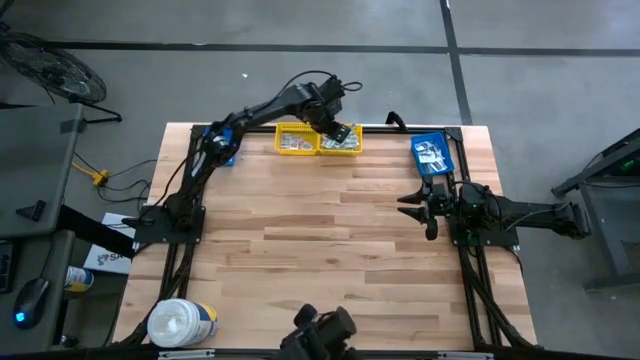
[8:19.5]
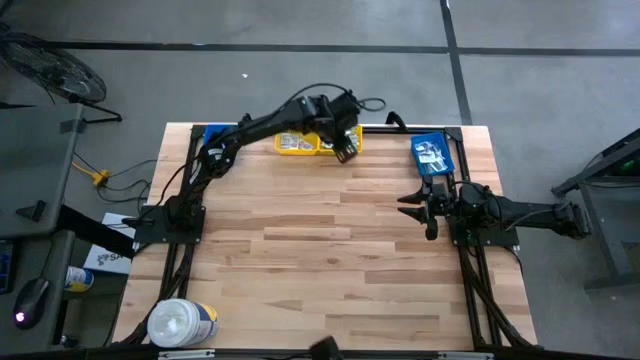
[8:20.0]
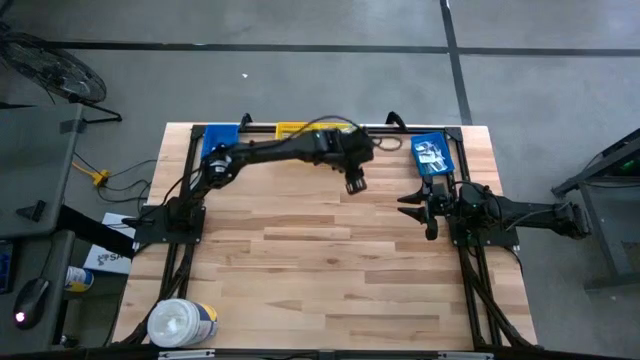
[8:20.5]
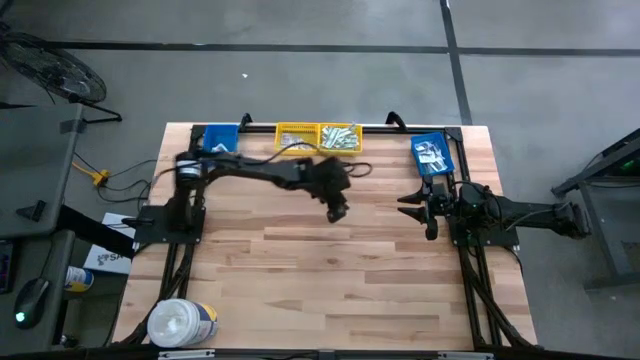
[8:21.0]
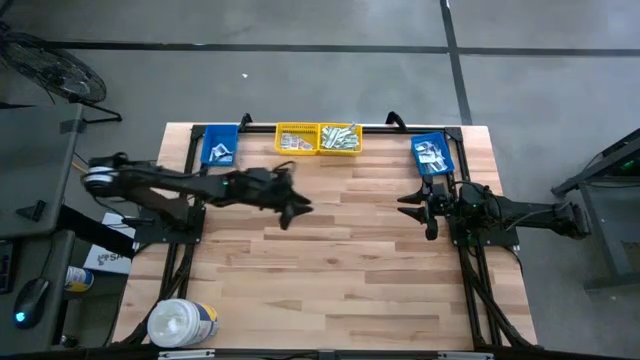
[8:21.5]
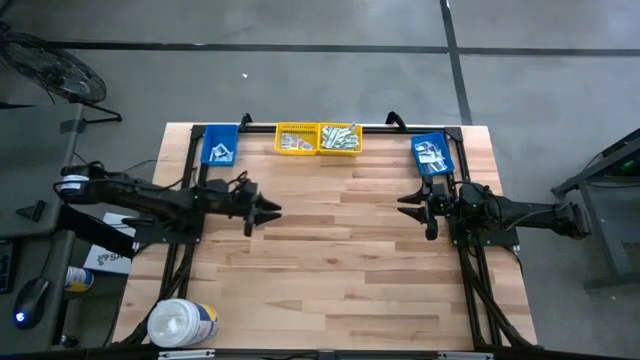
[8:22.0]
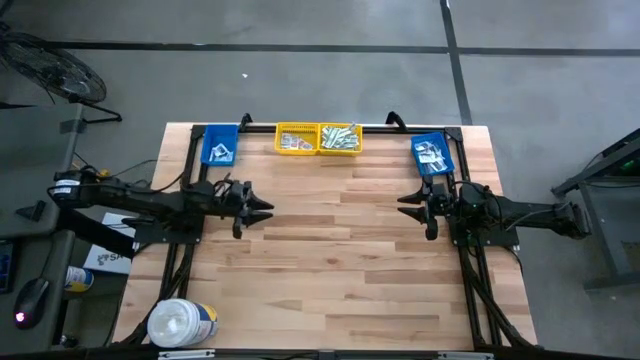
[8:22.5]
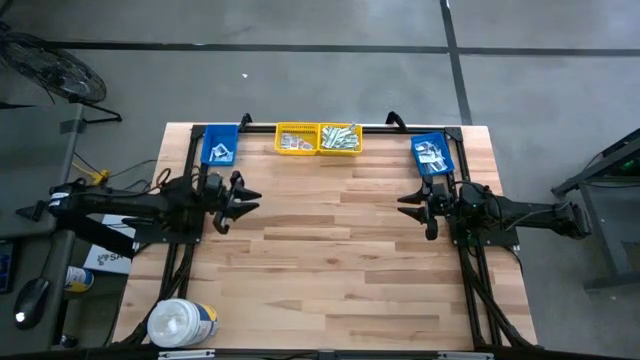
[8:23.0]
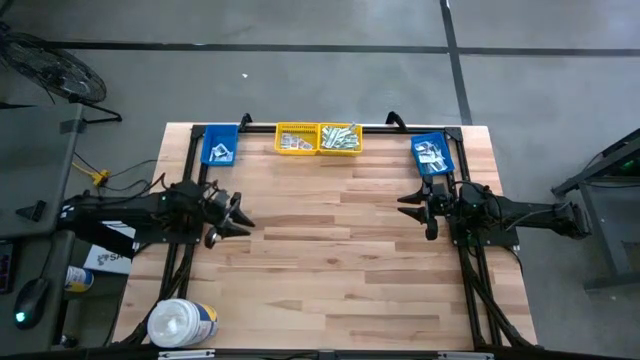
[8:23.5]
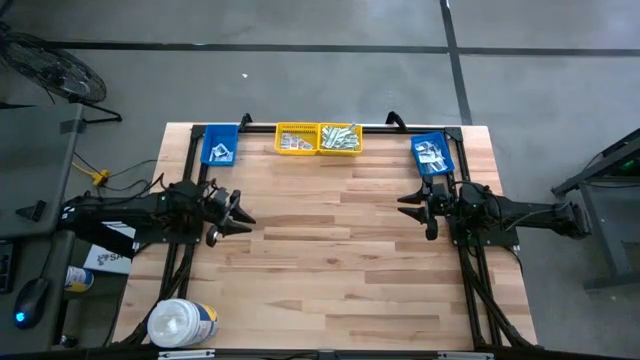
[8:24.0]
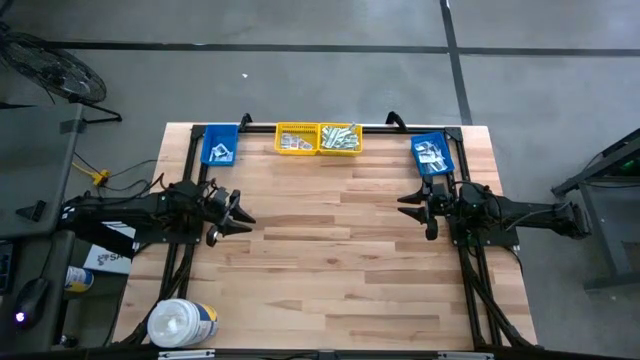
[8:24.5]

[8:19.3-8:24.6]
Task: Pick & Place First Aid Supplies
Return to Home Position
